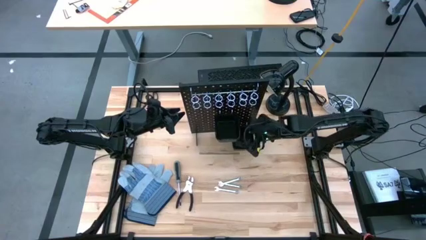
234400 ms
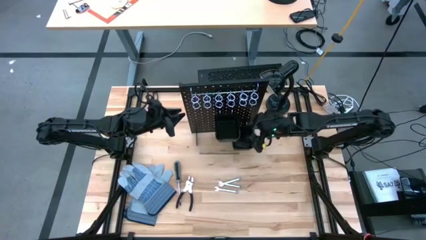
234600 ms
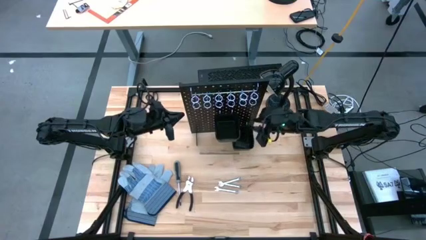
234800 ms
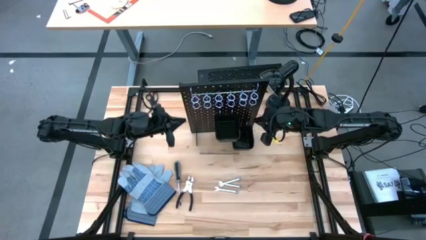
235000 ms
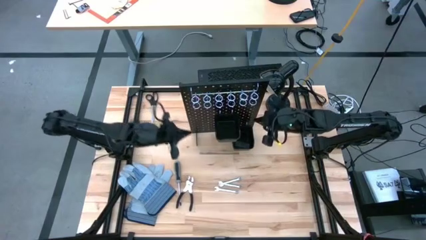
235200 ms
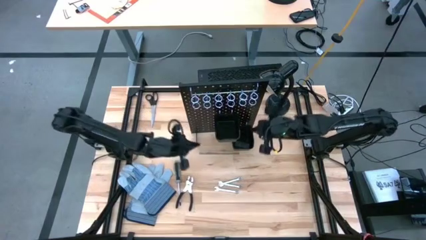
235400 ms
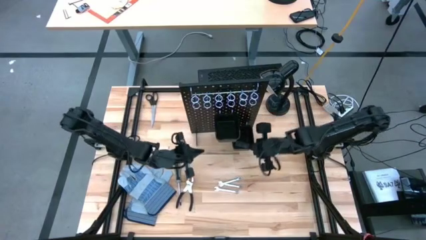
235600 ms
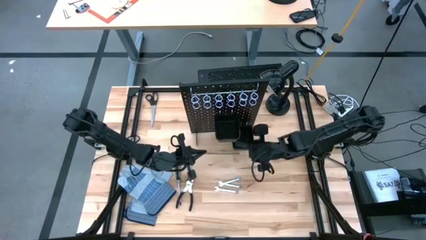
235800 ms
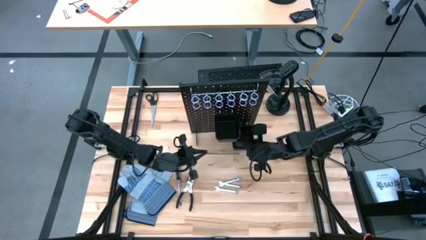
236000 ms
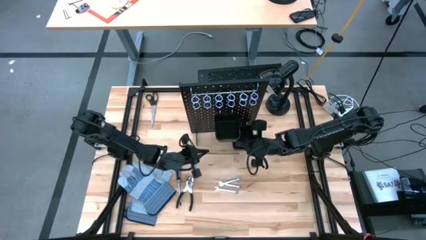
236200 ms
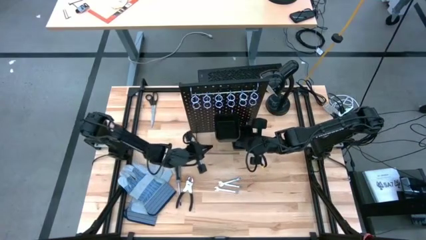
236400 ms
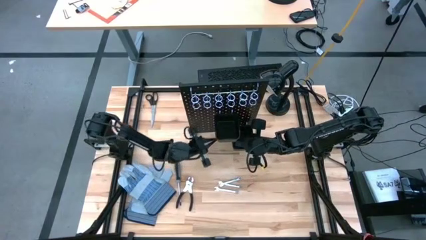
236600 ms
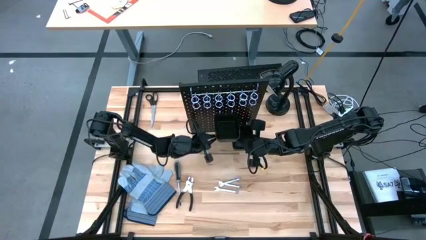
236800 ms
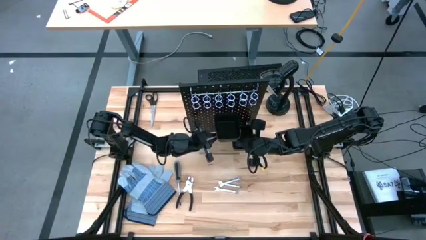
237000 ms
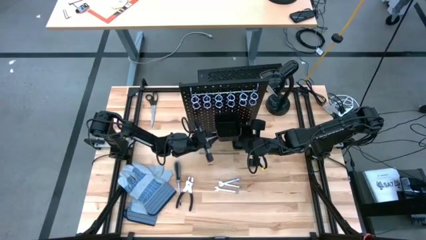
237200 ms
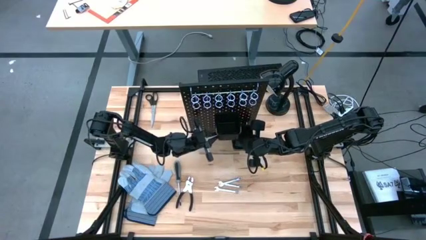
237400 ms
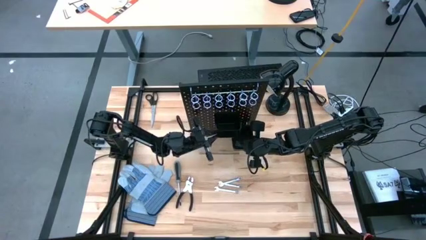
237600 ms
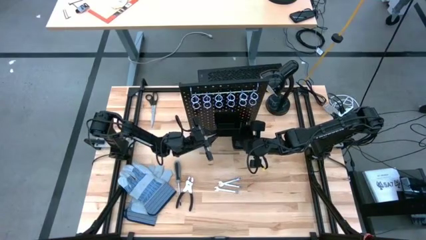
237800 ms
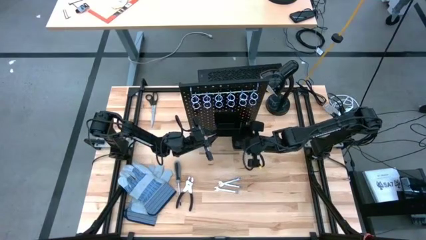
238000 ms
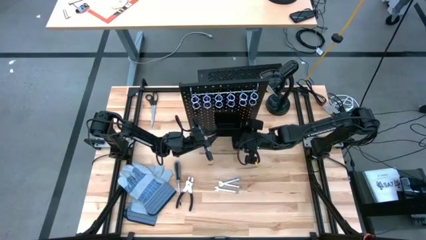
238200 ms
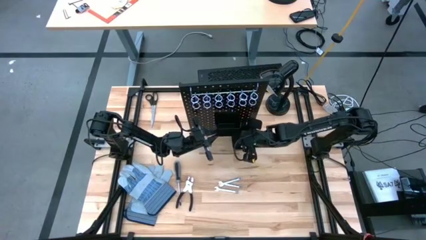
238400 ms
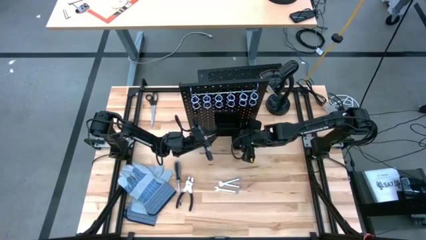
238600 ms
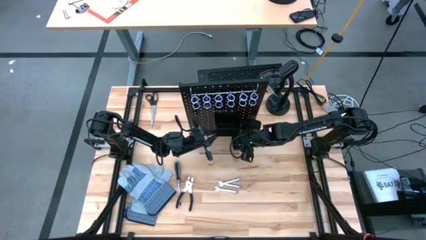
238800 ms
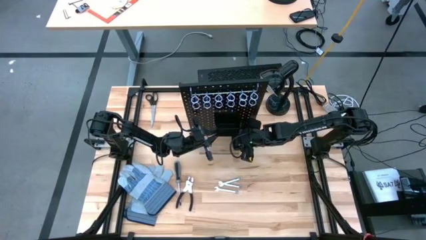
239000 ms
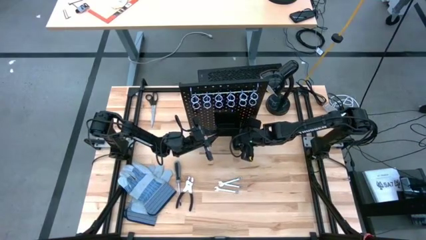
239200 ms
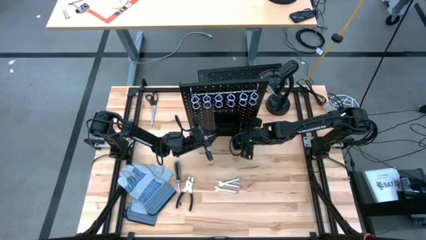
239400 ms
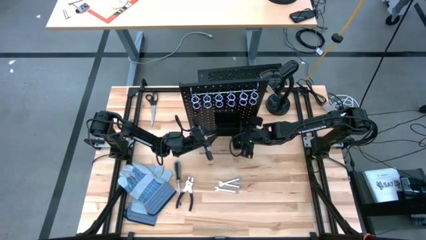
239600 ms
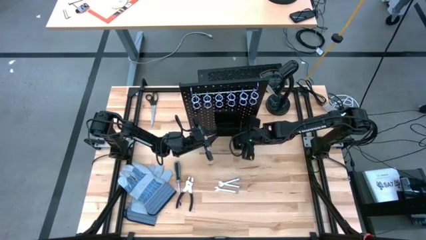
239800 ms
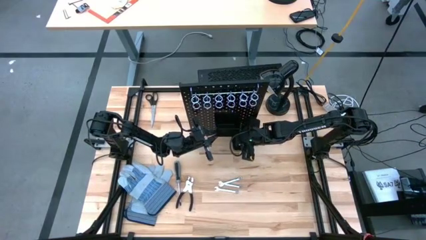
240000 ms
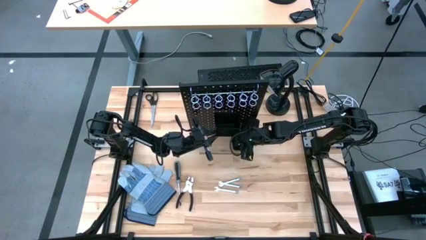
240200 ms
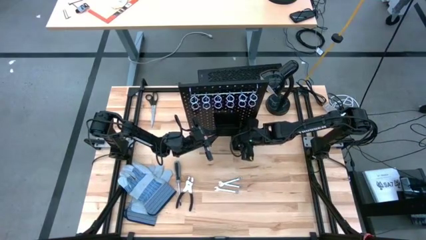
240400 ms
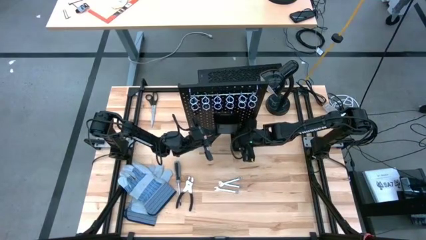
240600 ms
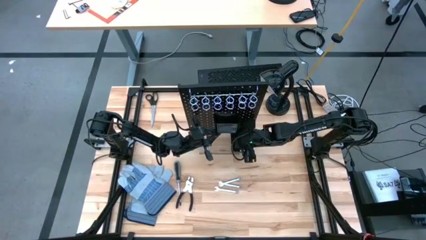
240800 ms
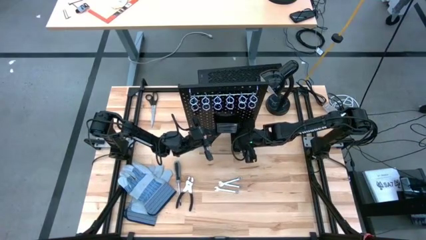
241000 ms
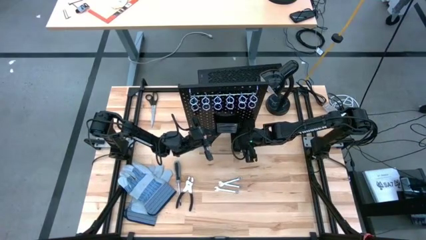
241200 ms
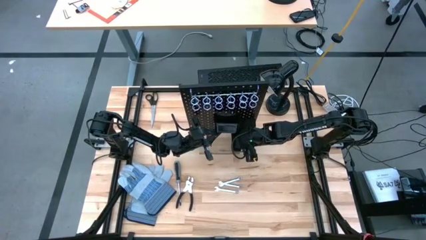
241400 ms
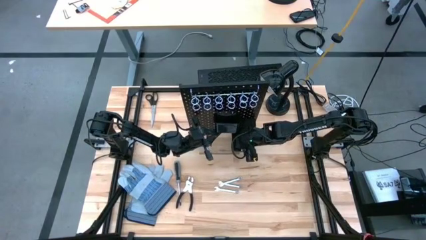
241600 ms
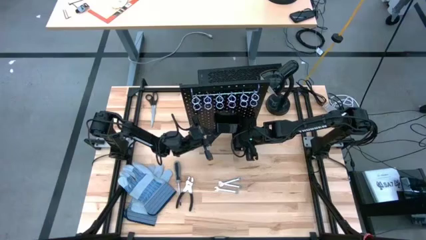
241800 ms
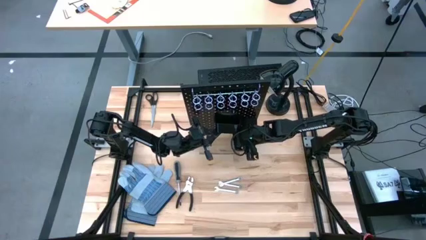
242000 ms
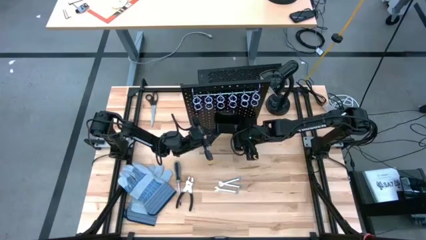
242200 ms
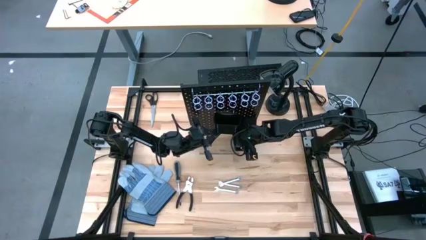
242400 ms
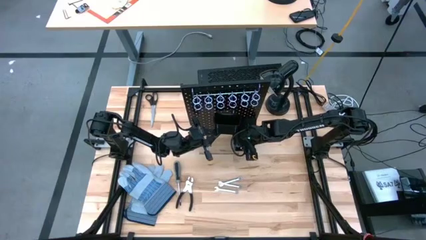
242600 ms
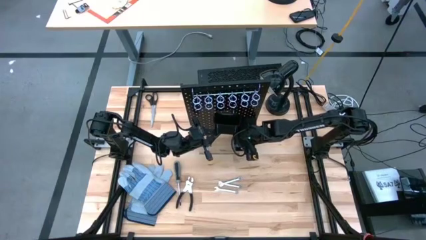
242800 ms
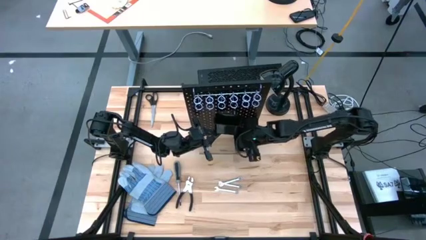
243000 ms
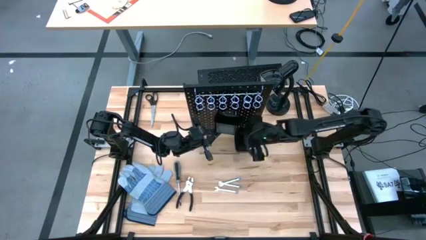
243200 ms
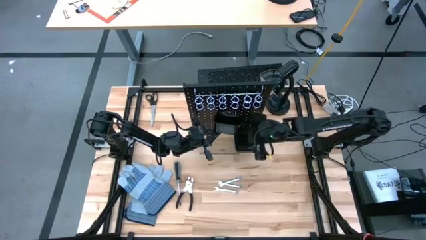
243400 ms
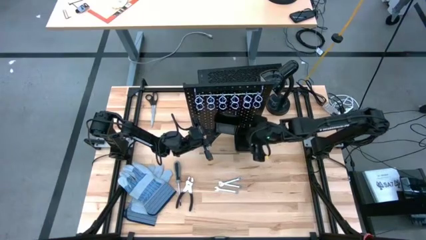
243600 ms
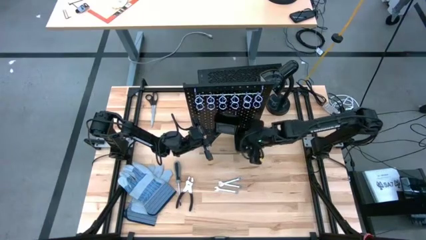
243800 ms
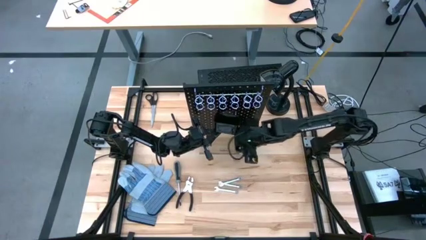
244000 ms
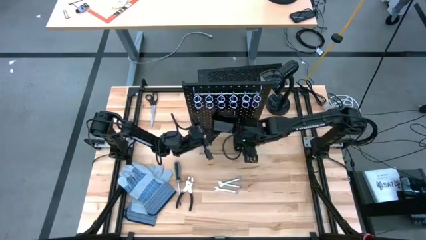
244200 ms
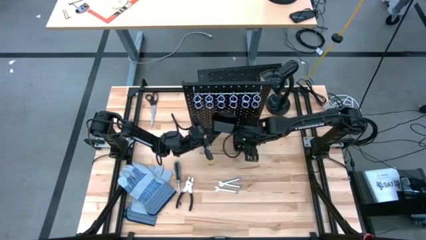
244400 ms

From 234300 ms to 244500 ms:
Task: Hang tools onto peg board
Remove the black utility knife blades from the bottom black bin of the black pegboard

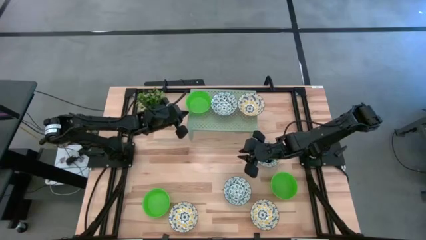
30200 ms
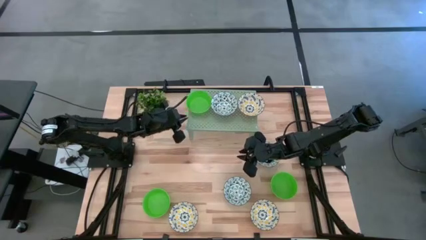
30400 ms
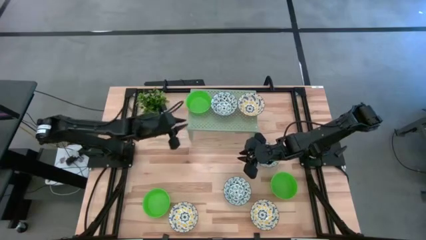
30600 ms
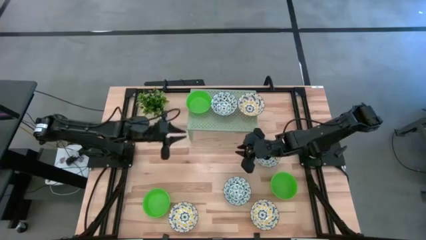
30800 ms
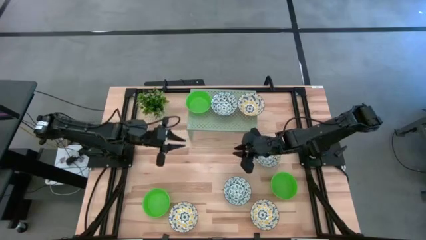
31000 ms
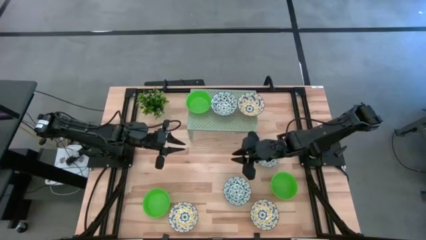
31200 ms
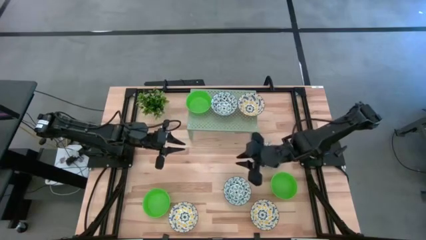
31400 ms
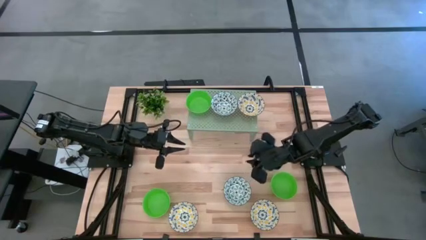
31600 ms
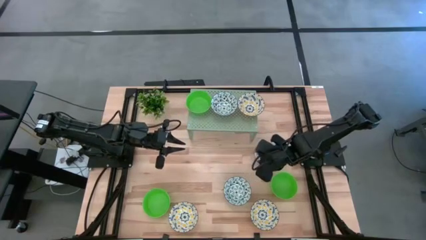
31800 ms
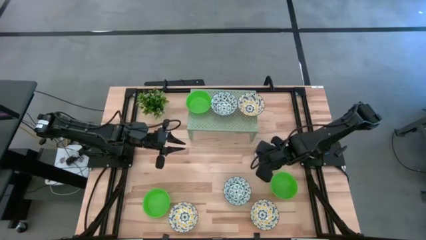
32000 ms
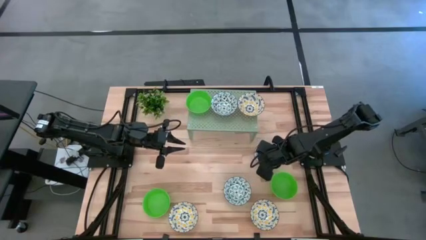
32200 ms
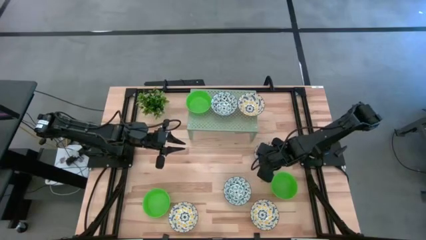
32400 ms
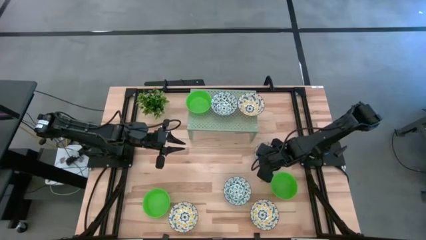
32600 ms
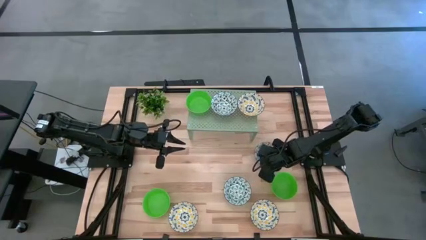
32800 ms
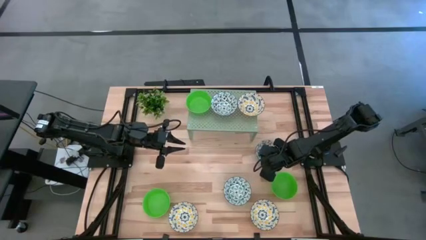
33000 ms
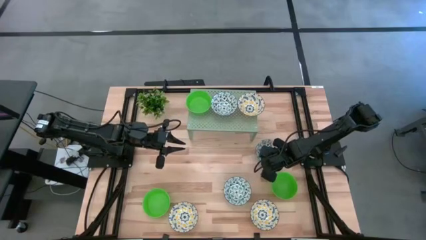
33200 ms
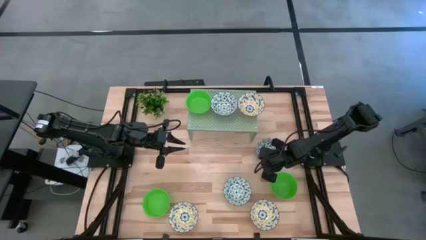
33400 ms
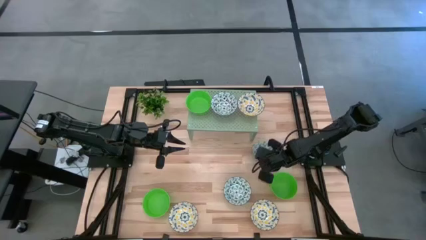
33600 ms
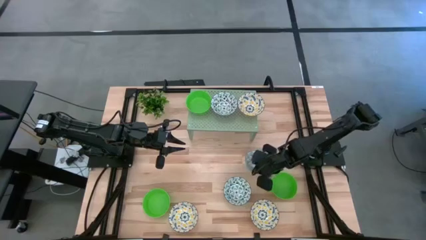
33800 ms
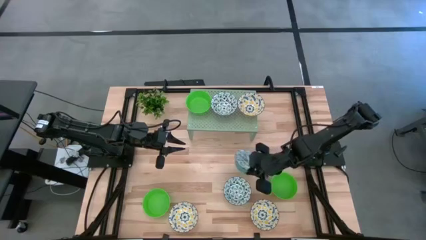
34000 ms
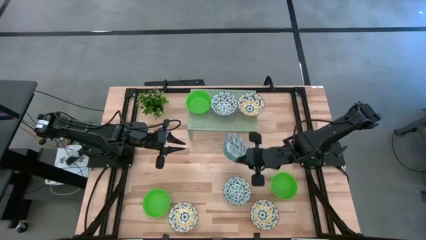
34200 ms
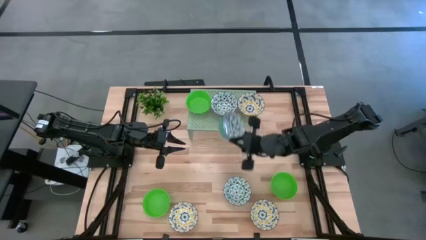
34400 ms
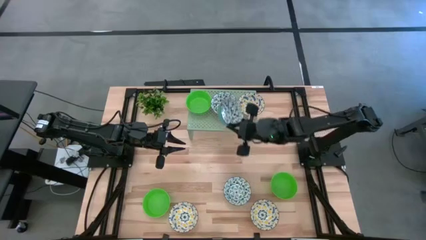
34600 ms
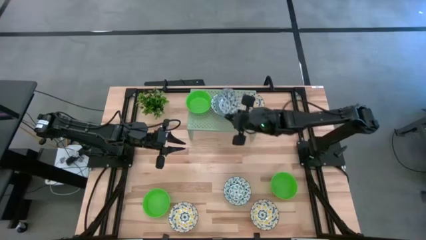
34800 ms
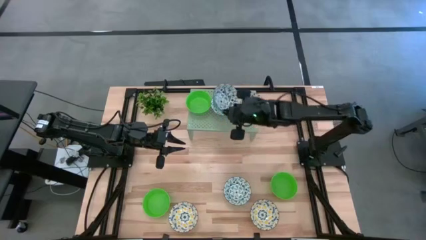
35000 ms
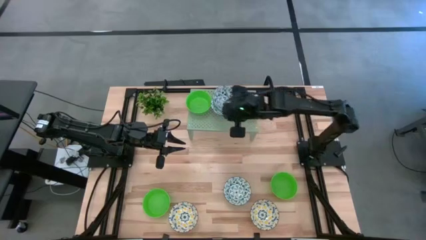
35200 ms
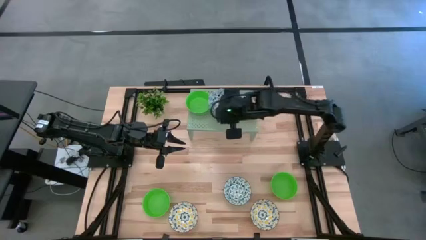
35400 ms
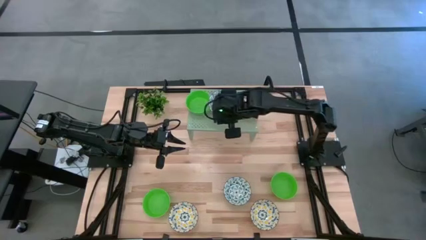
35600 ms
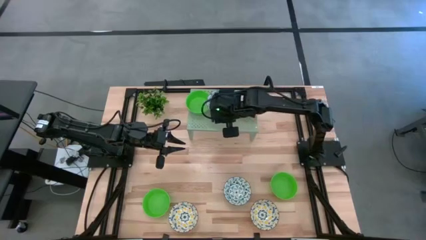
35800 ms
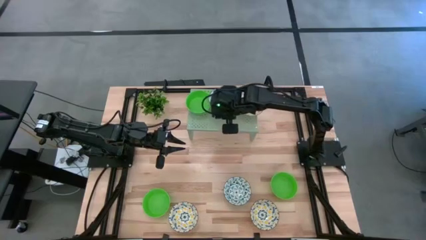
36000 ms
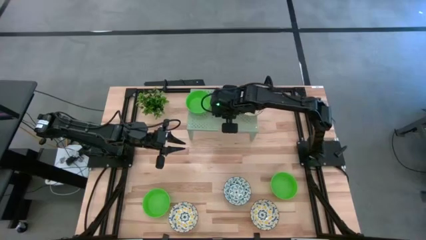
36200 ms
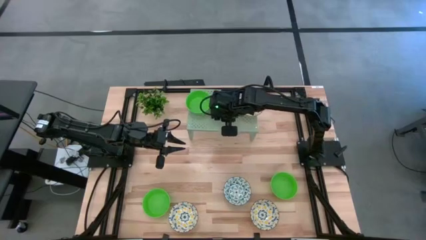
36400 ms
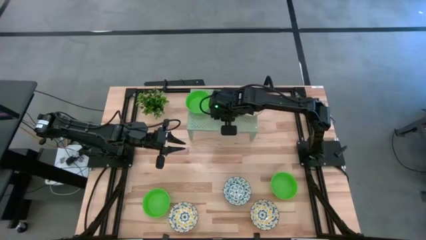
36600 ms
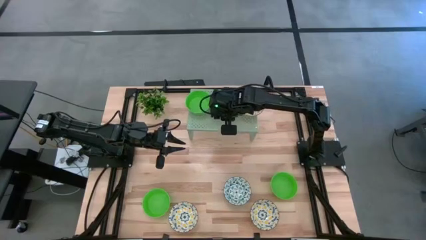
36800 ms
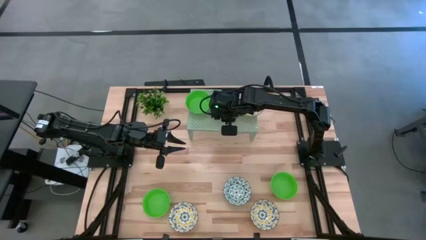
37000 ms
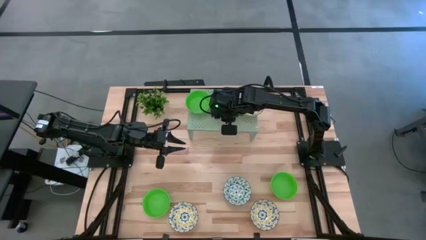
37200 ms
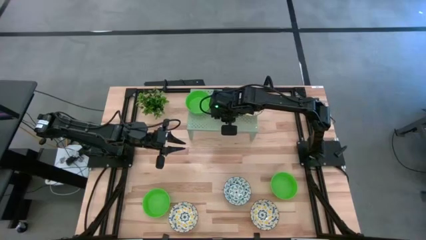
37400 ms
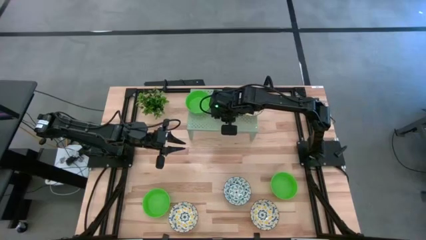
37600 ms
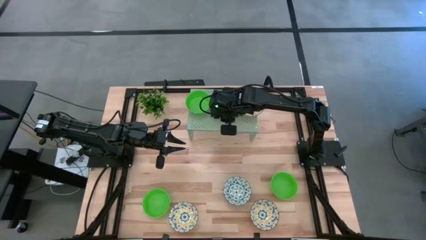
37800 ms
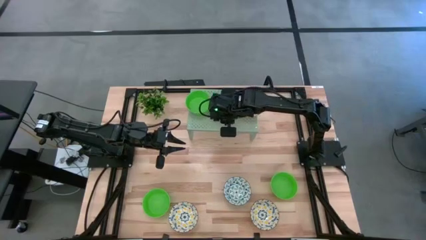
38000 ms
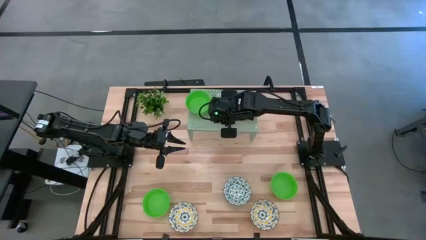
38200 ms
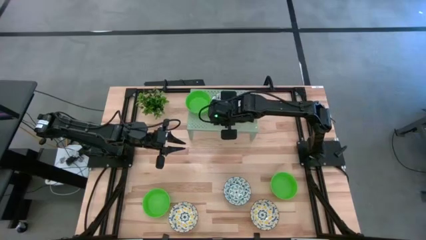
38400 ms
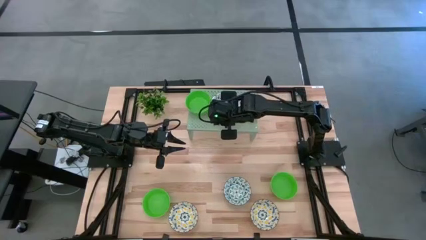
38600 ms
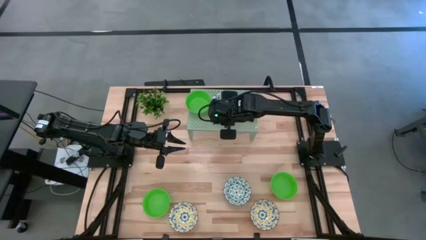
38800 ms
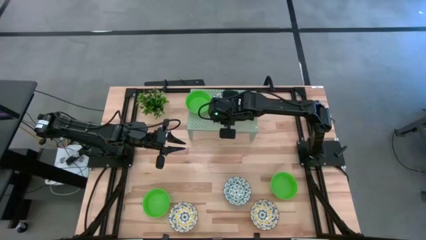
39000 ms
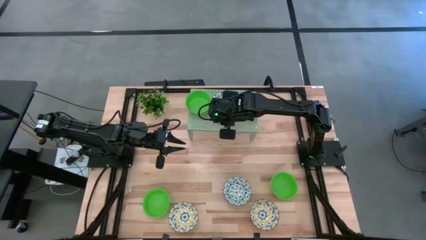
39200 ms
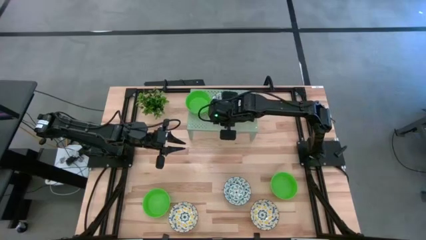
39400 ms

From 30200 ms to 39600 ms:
Task: Pick & Place Mini bowls
Stack the top blue bowl on top of the blue bowl on the shelf
